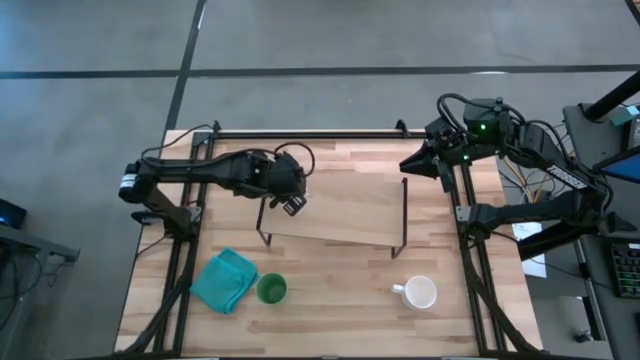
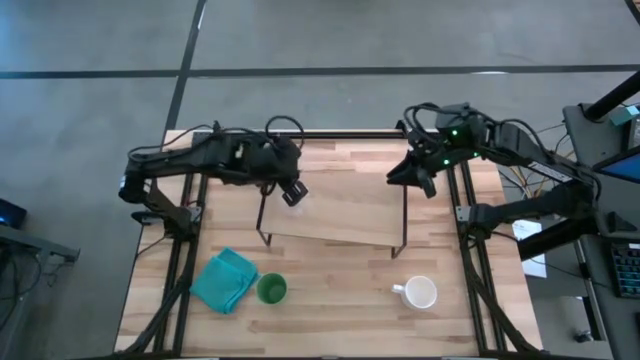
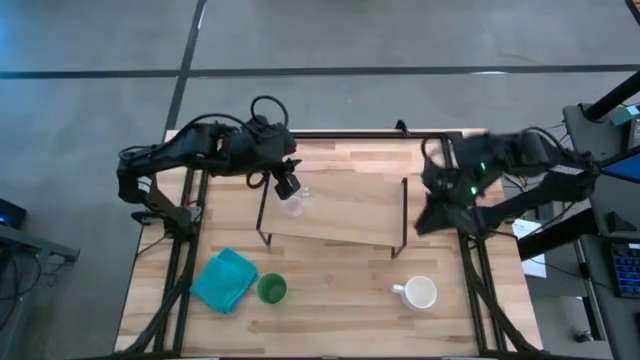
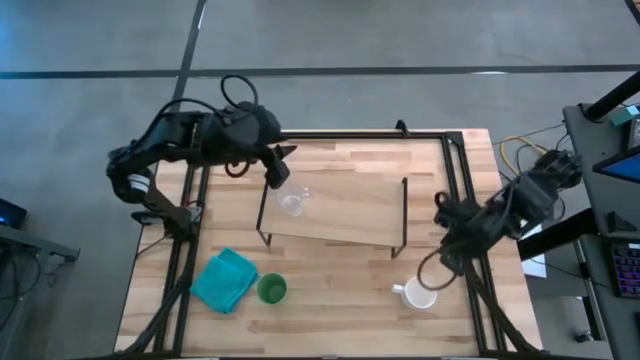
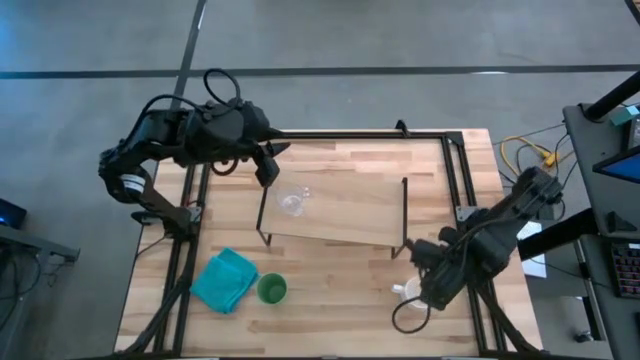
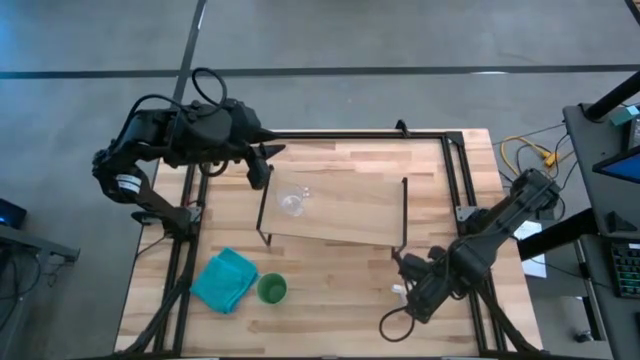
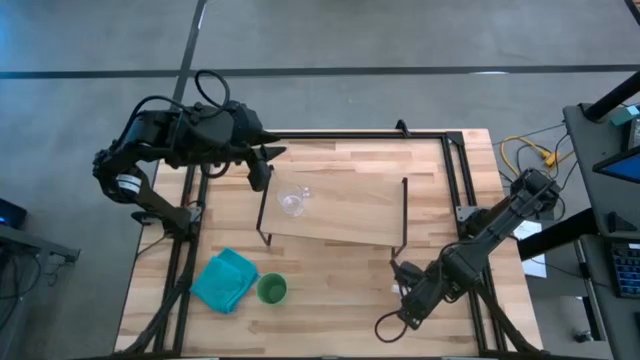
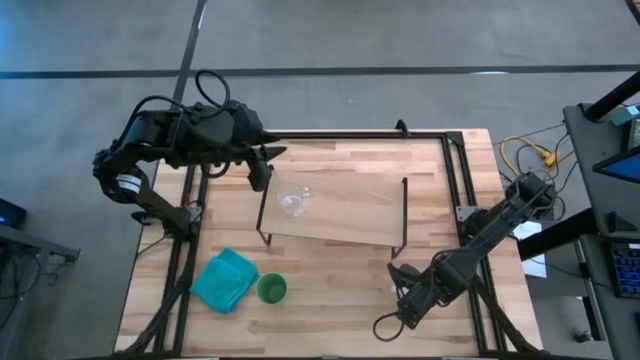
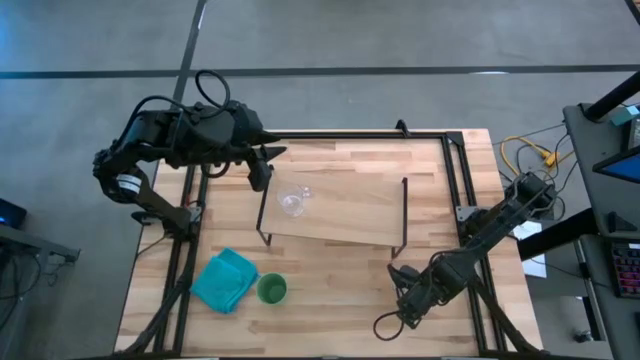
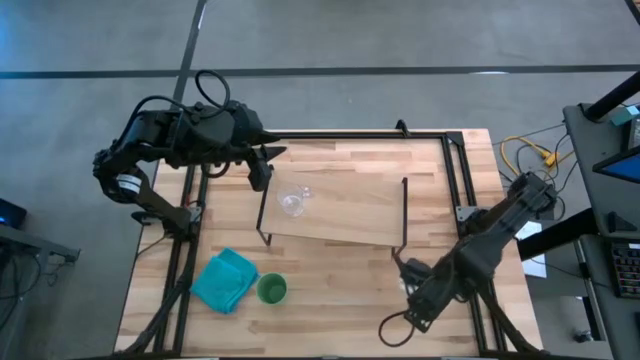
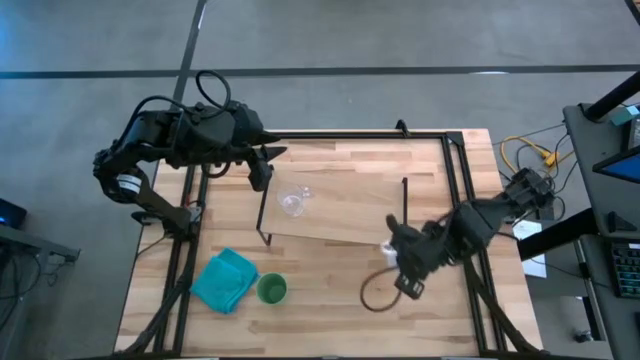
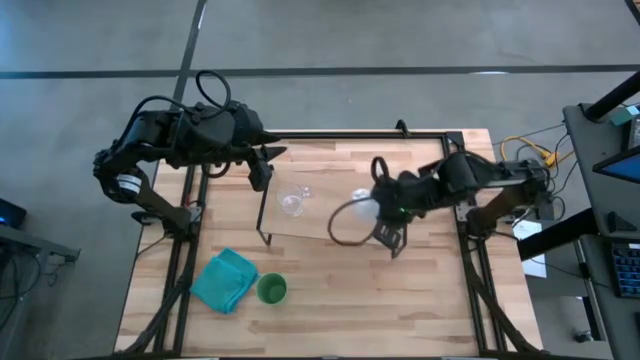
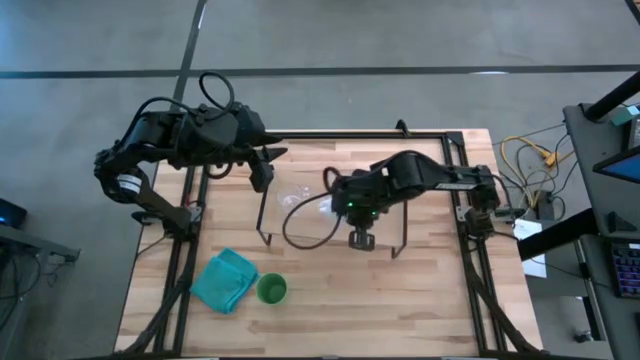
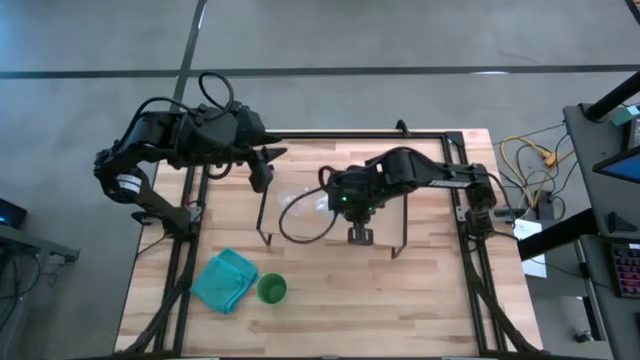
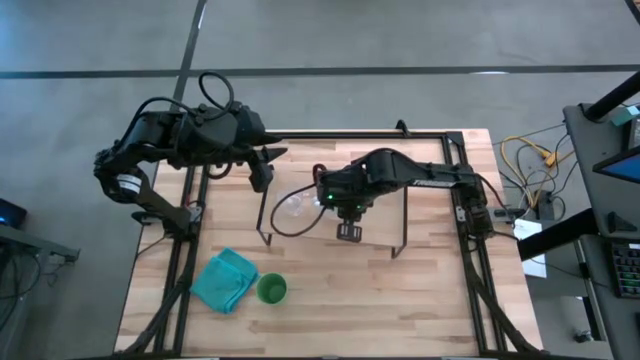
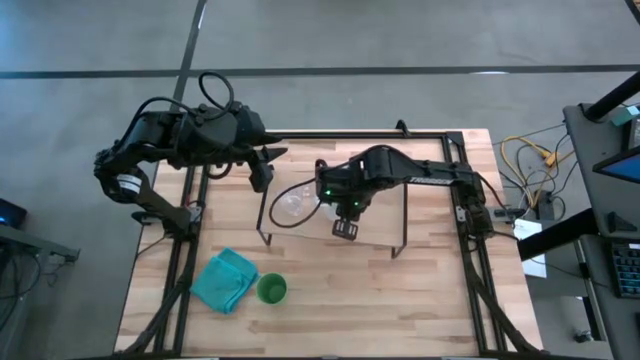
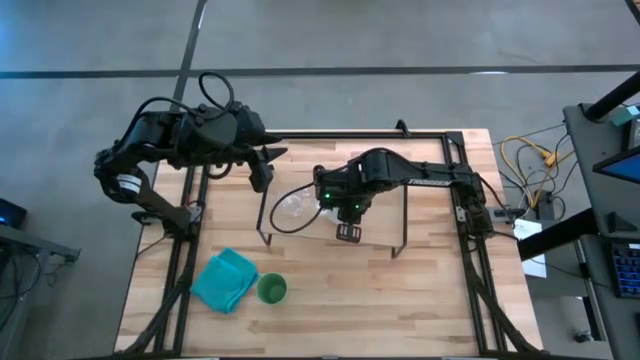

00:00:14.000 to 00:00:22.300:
Task: Stack small to large cups/mugs on shelf
Put the white cup on the shelf

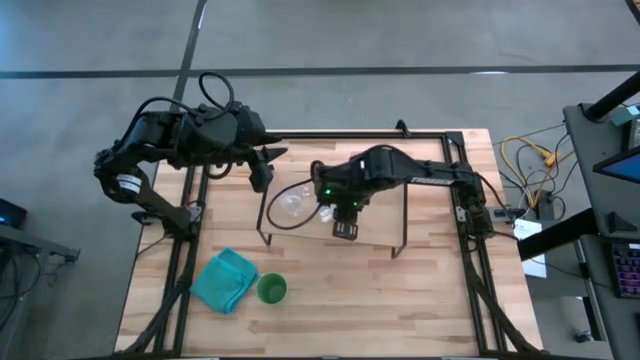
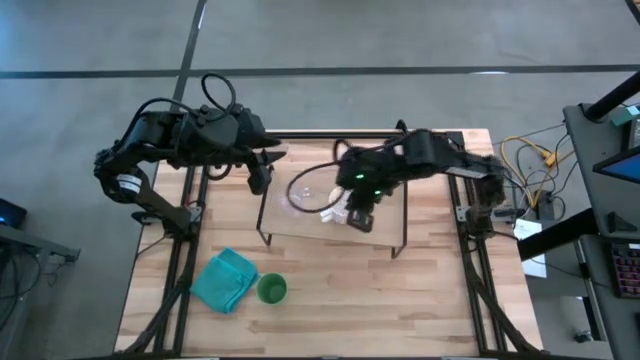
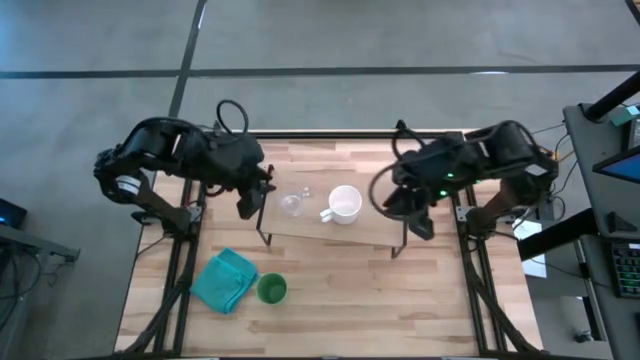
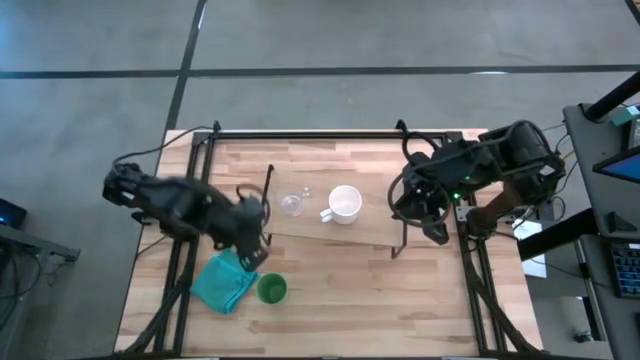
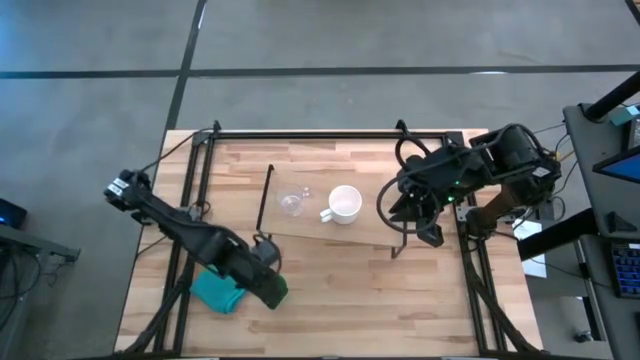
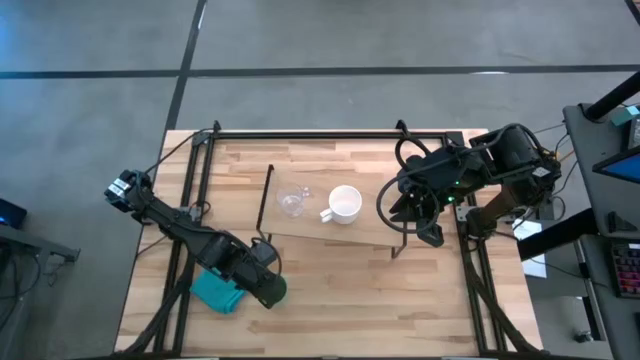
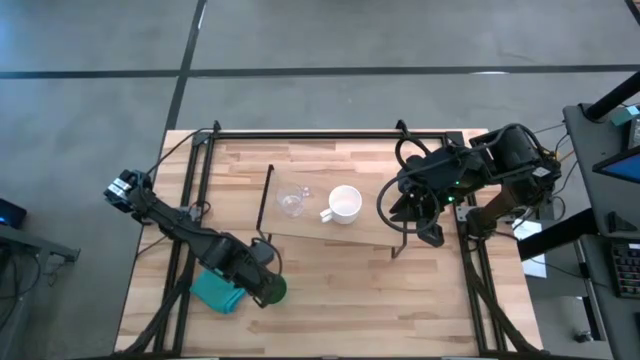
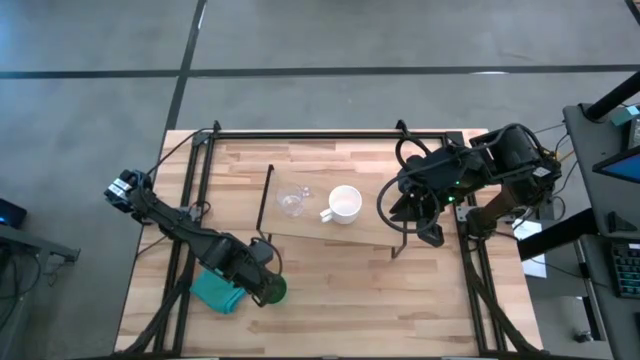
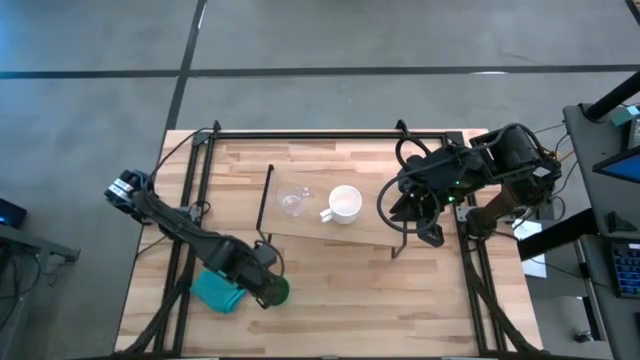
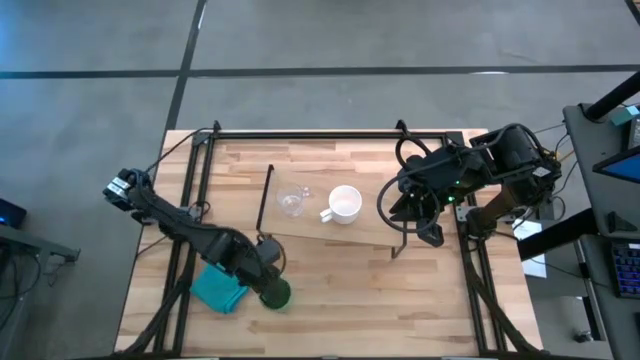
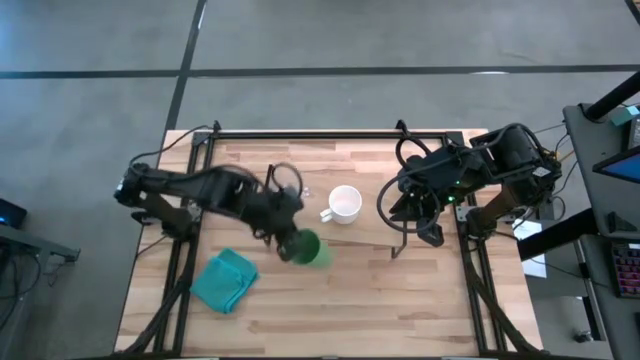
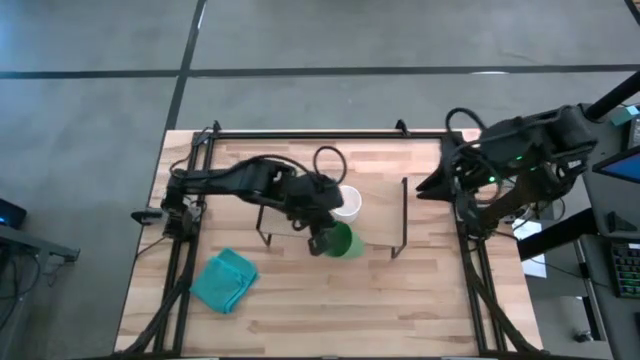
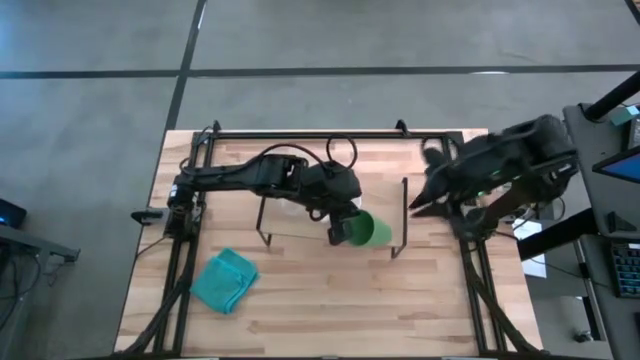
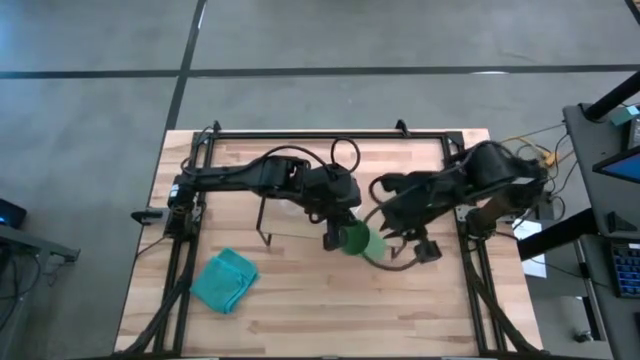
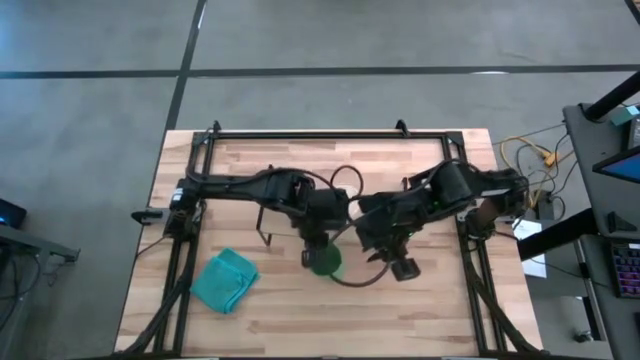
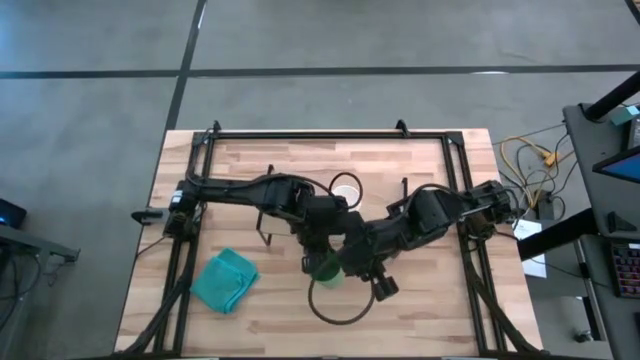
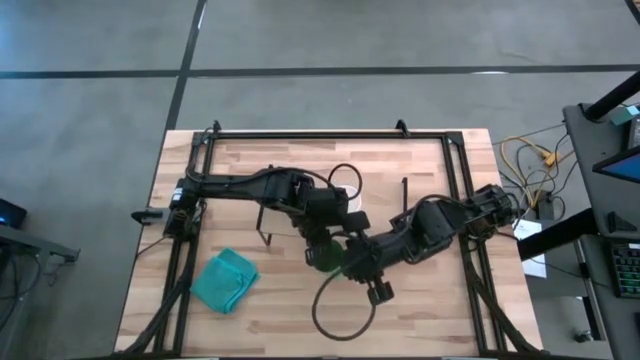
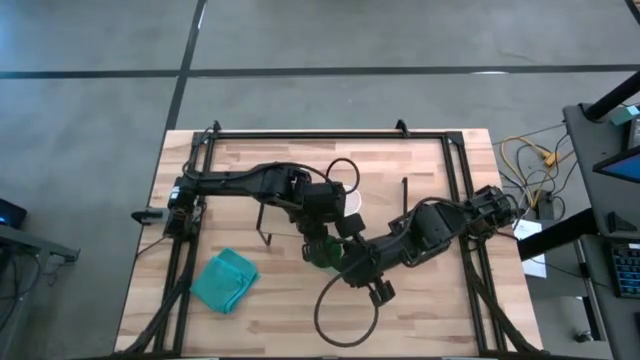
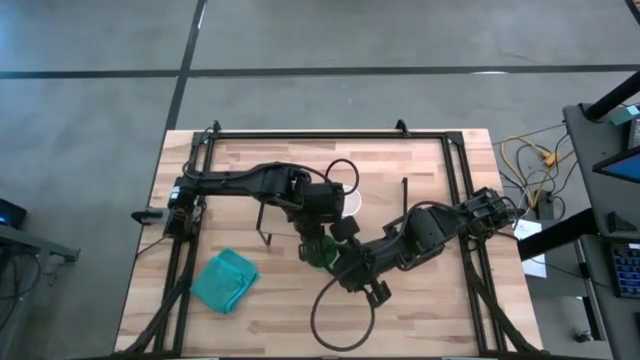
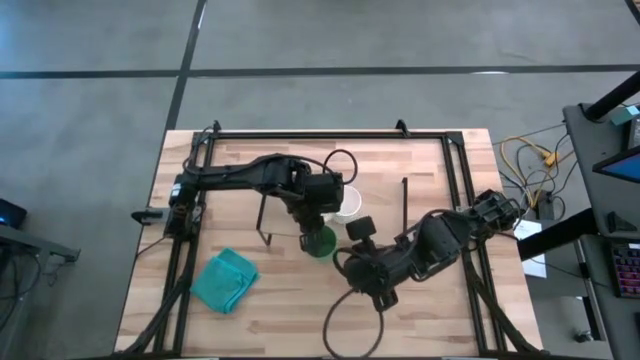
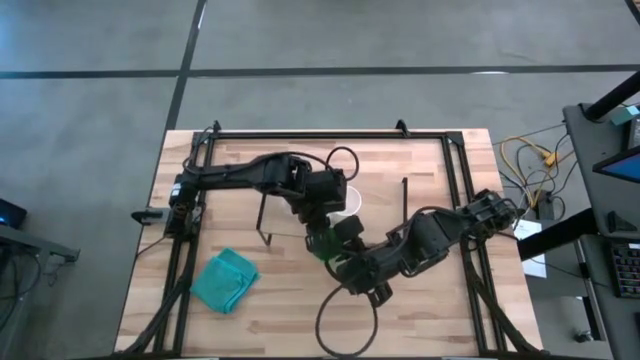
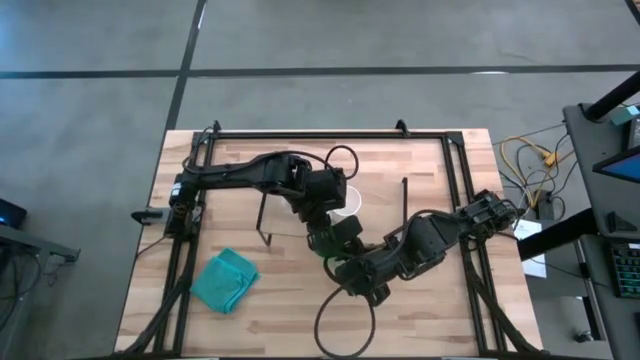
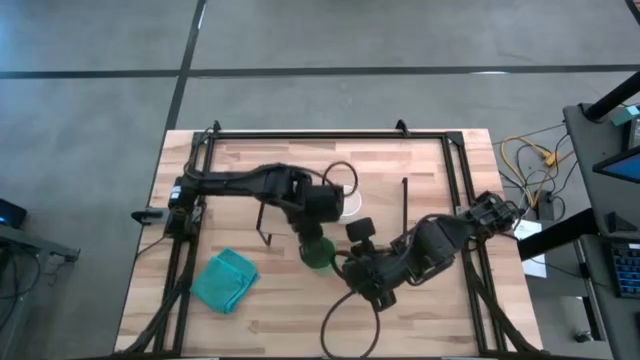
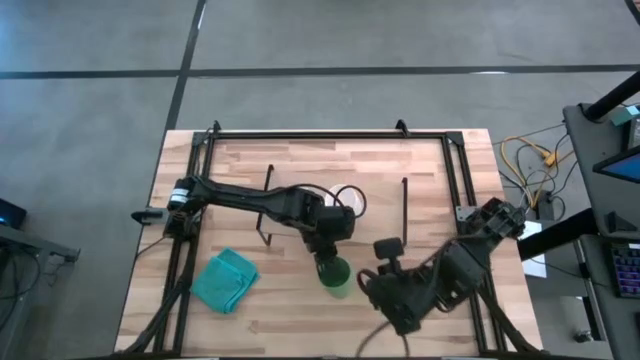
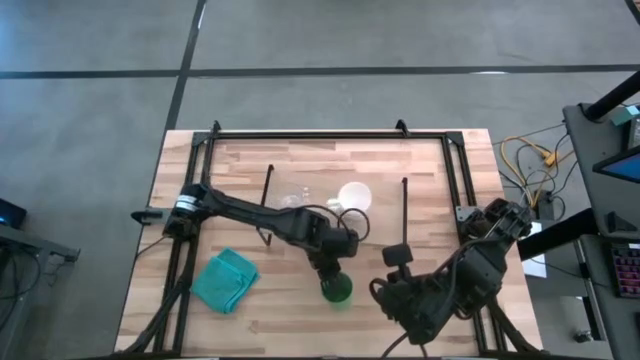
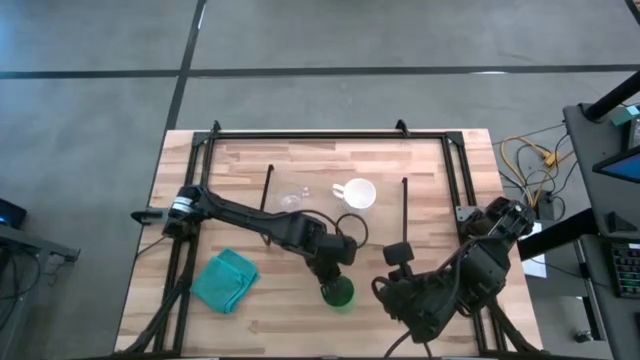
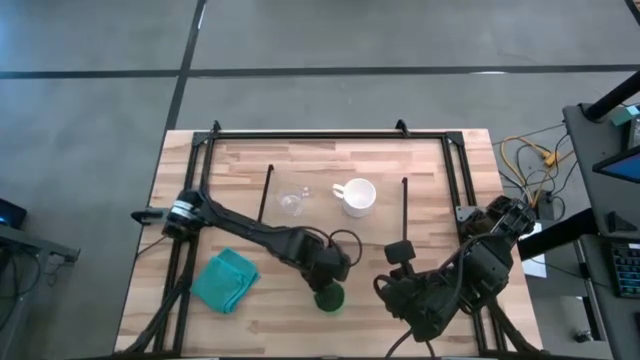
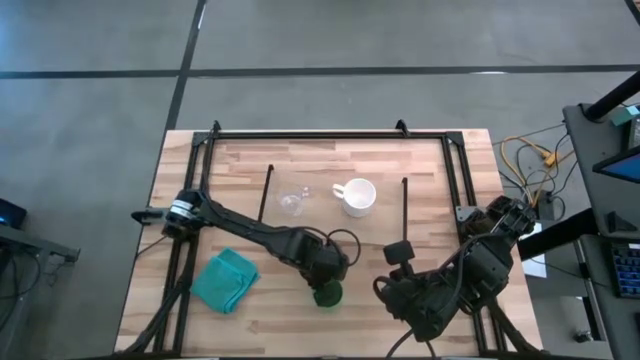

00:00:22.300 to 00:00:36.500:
Move the green cup to the bottom middle of the table
